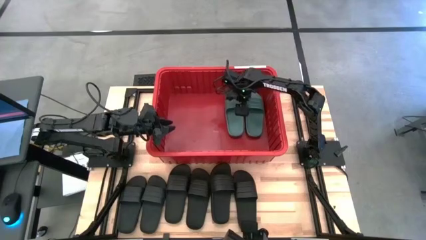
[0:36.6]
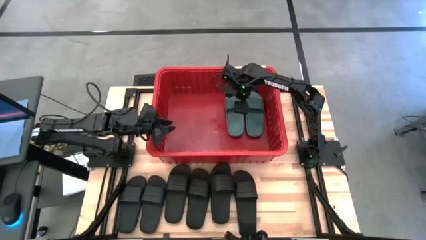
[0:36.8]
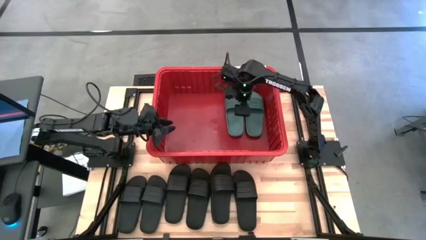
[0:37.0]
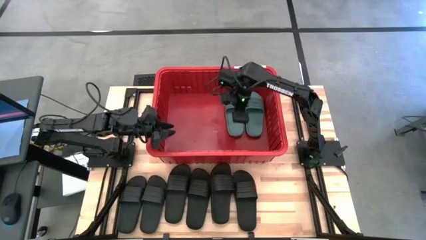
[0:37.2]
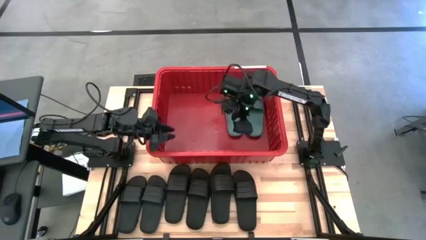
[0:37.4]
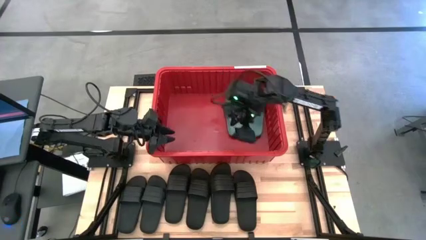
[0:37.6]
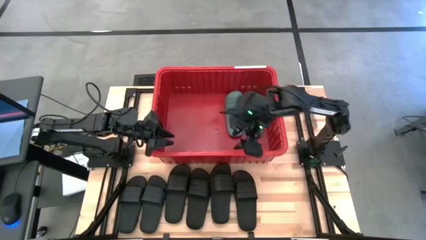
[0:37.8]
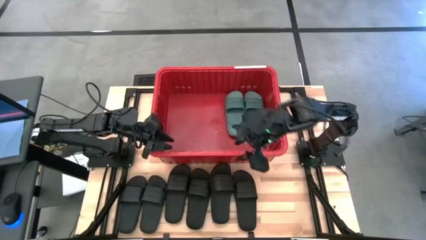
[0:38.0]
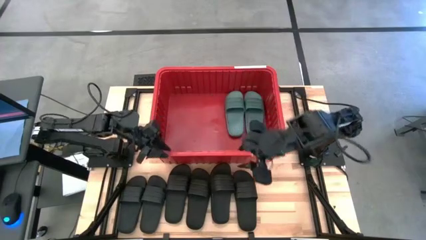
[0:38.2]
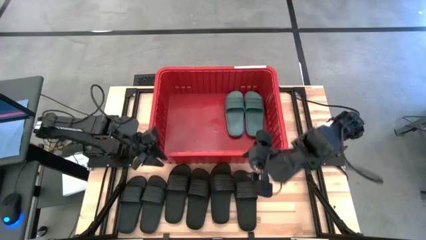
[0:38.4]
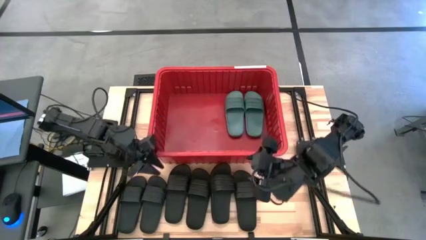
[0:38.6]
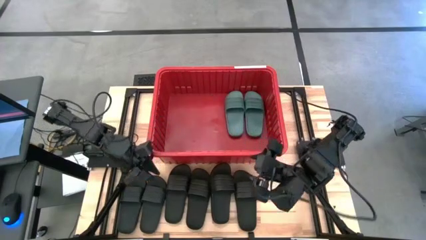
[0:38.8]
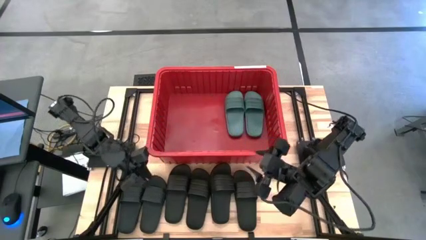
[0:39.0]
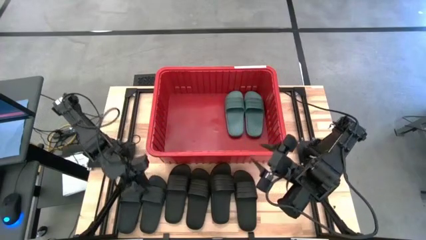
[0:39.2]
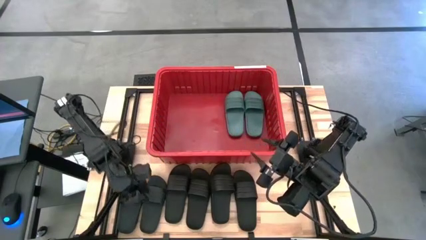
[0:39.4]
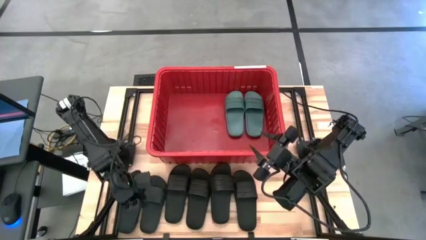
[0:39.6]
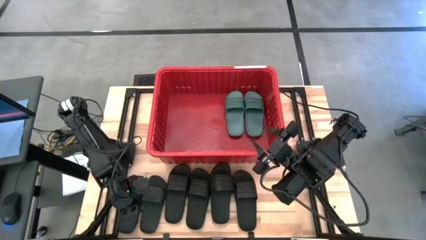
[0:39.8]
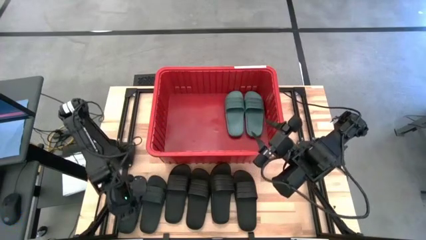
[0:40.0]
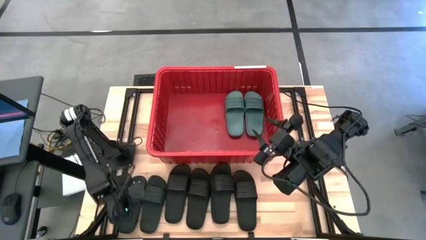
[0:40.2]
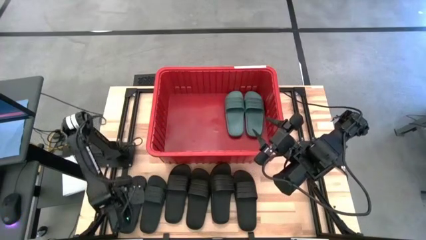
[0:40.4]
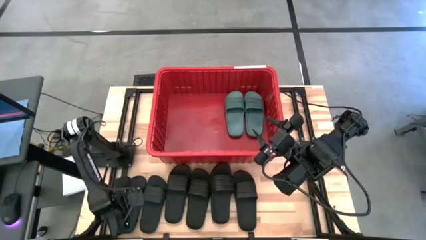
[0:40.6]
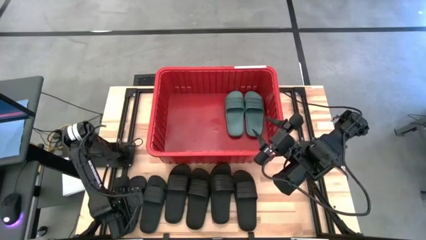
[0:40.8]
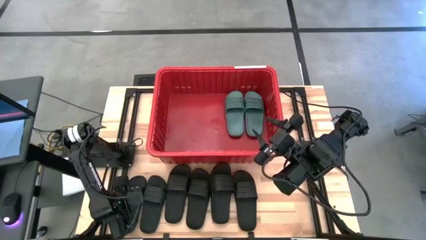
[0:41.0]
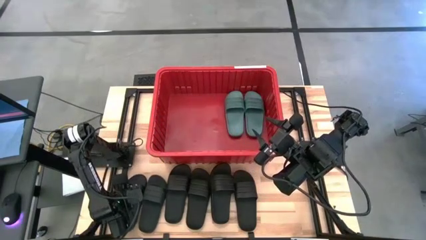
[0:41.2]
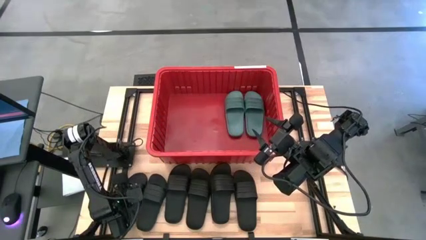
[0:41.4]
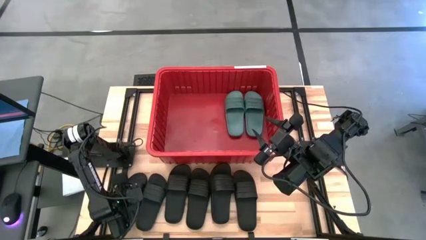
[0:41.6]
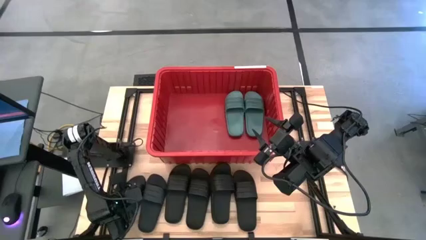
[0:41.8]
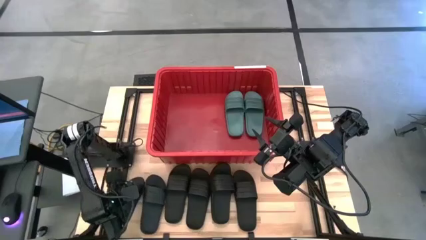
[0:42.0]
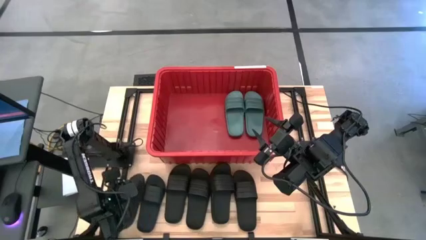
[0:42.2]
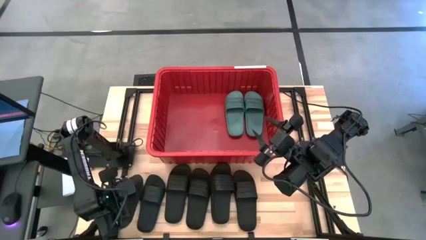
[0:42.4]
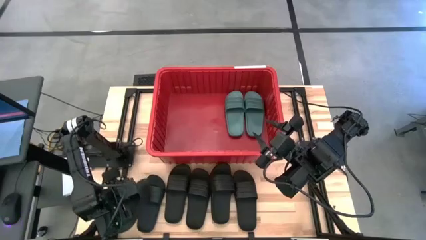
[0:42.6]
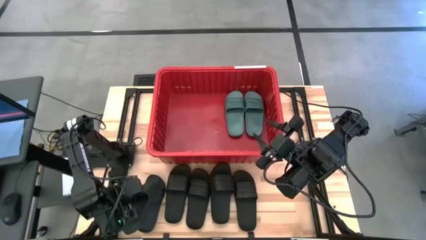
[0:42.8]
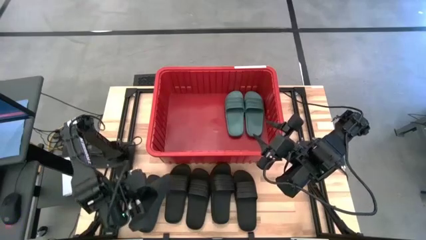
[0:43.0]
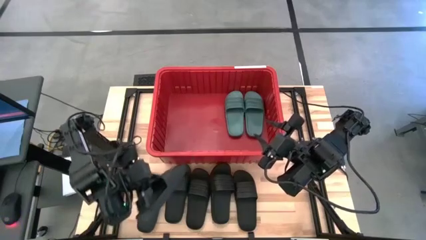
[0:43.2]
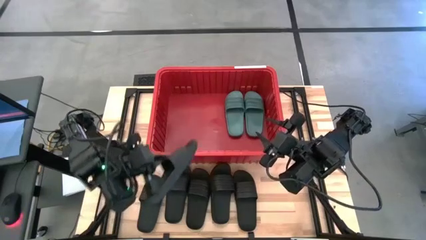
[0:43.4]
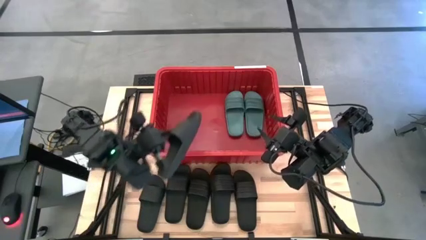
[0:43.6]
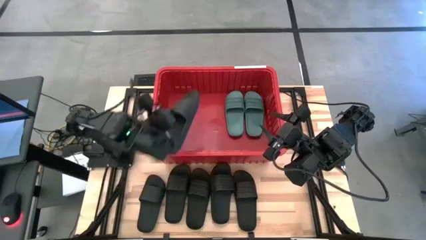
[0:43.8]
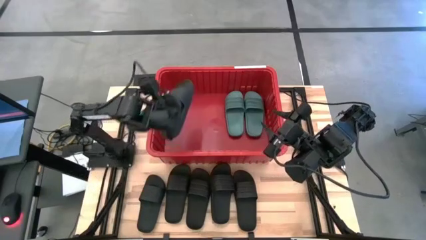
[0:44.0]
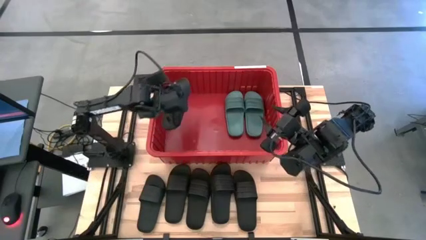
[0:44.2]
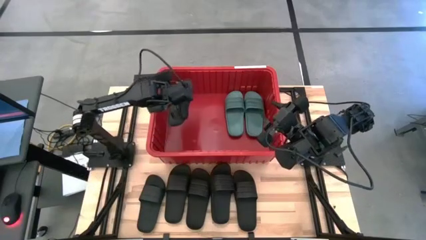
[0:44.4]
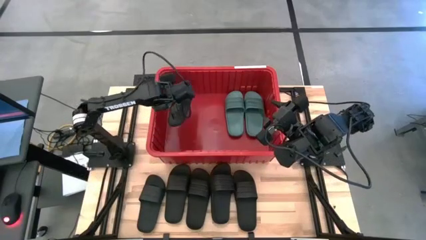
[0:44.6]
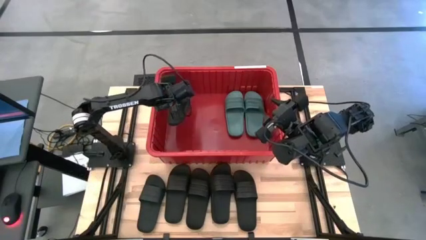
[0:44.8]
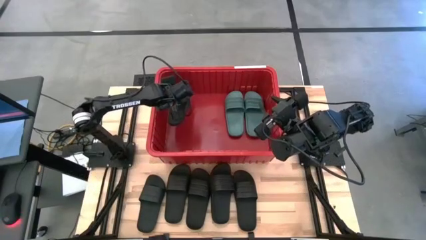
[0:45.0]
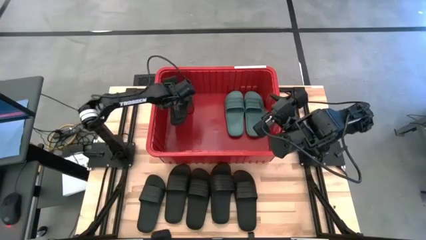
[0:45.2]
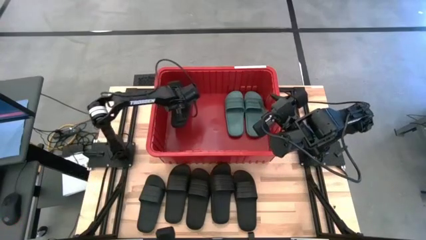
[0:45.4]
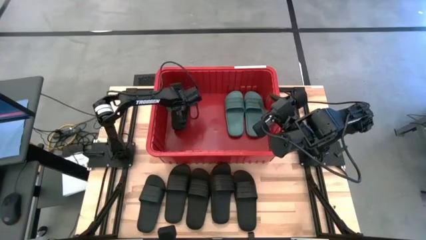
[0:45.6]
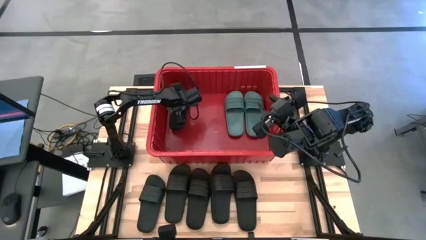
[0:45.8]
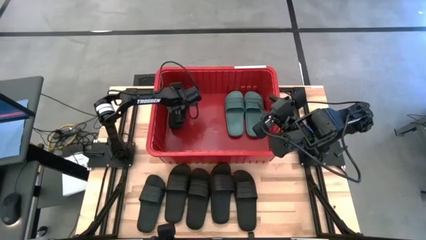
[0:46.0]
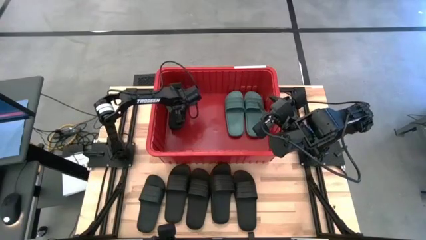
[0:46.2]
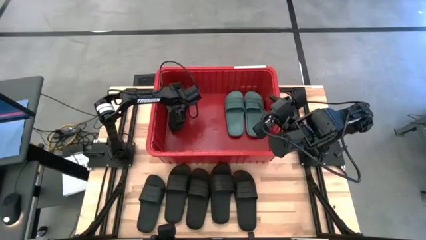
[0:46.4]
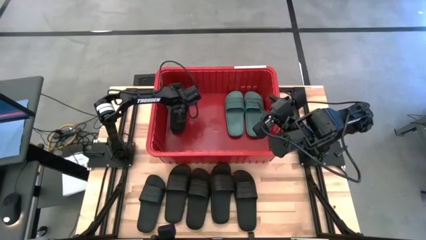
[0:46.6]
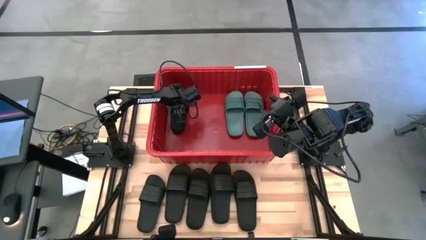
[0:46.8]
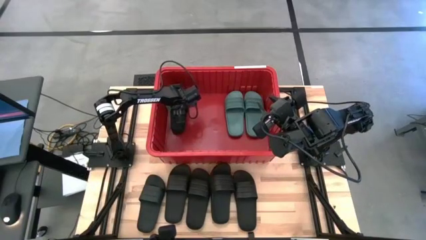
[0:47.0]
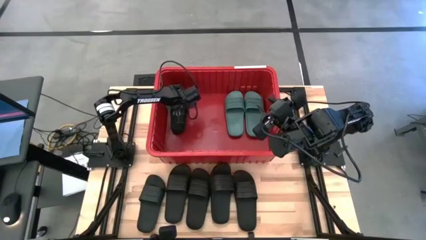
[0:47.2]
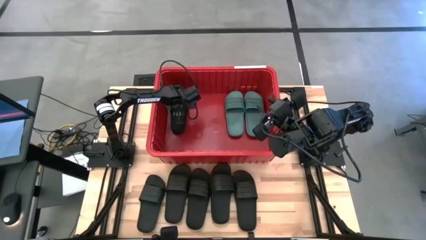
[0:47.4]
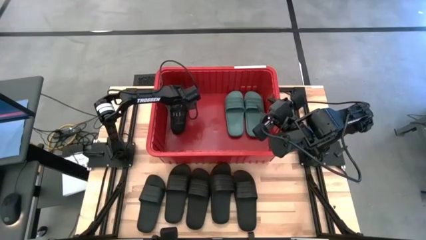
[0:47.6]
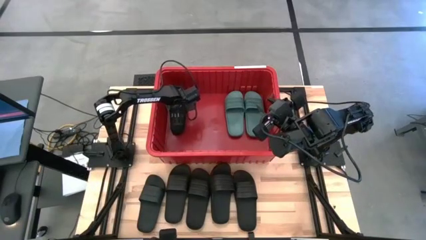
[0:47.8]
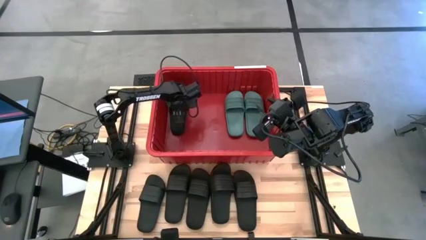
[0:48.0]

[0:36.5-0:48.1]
Task: Pick and place slides into bin
Put the black slipper into the red organizer bin
